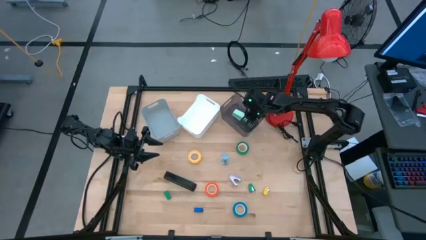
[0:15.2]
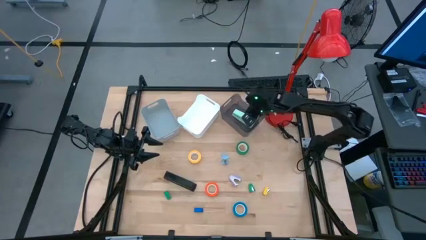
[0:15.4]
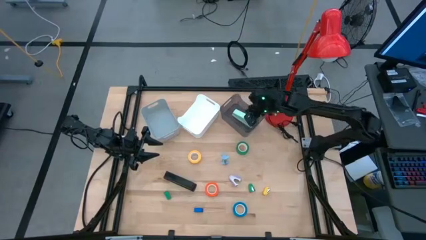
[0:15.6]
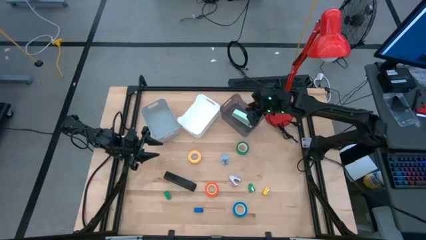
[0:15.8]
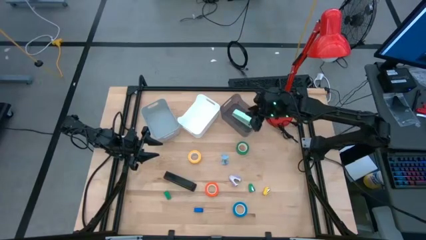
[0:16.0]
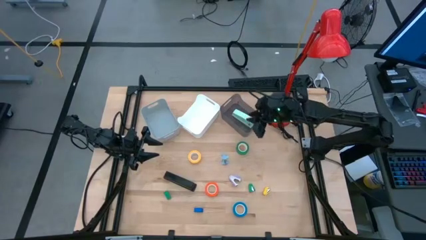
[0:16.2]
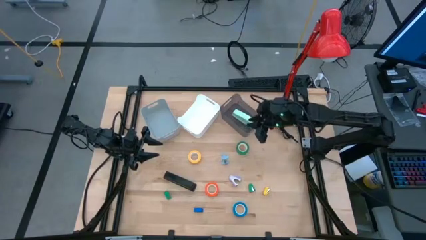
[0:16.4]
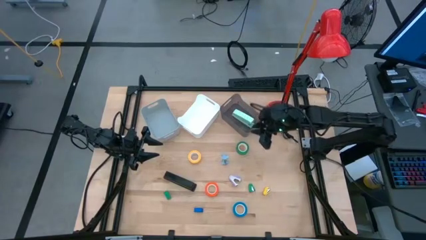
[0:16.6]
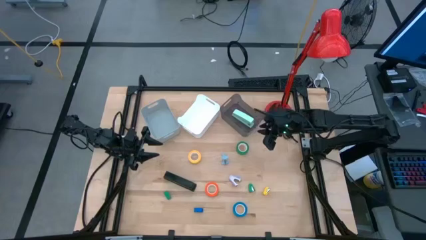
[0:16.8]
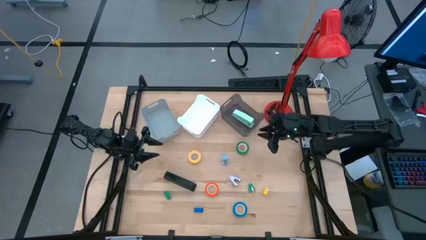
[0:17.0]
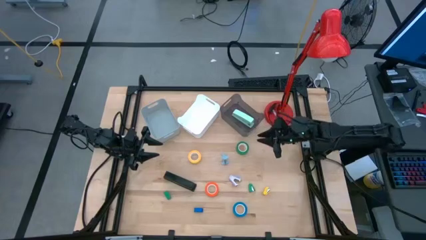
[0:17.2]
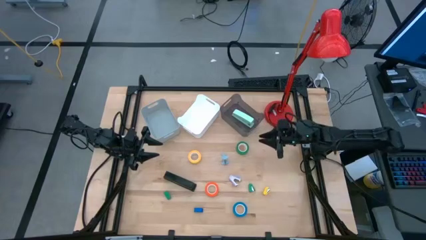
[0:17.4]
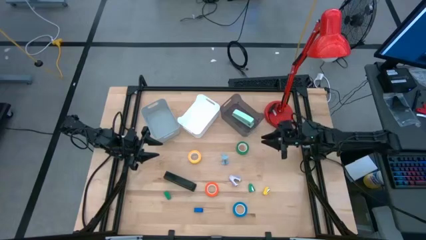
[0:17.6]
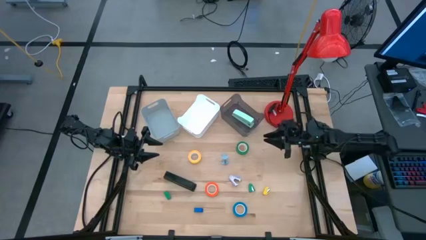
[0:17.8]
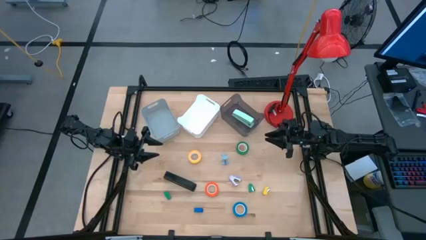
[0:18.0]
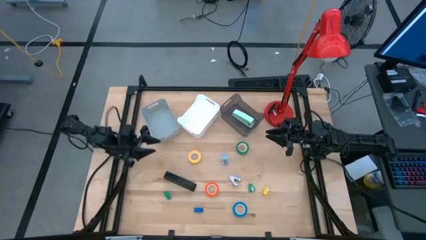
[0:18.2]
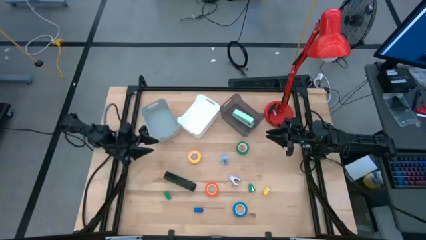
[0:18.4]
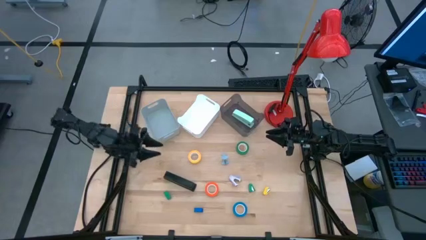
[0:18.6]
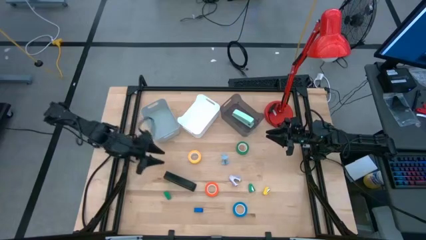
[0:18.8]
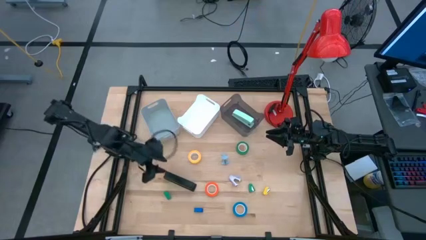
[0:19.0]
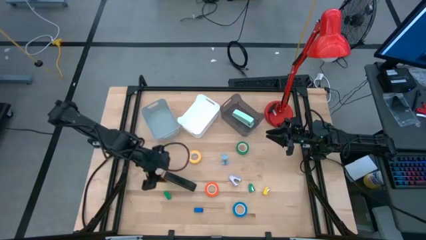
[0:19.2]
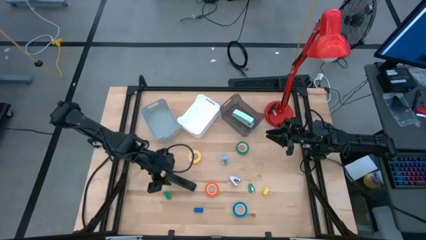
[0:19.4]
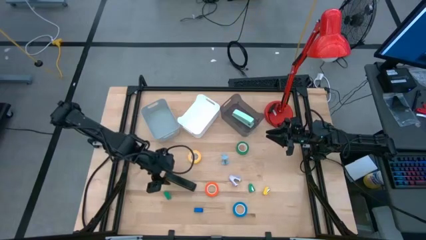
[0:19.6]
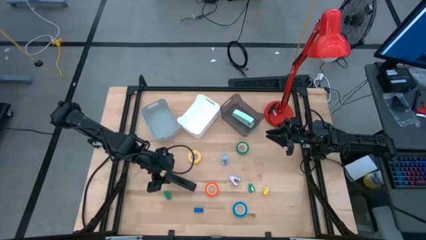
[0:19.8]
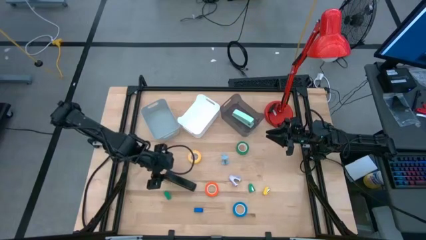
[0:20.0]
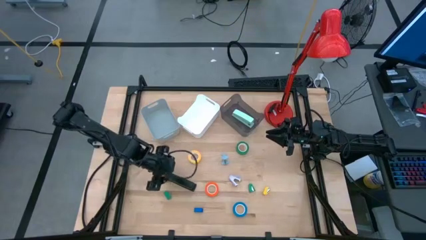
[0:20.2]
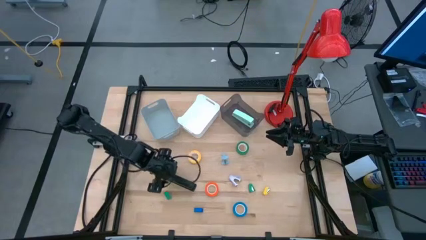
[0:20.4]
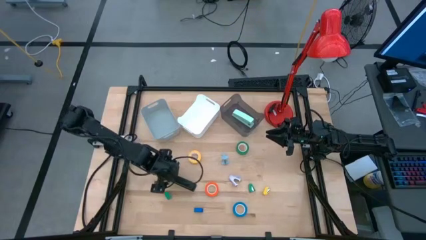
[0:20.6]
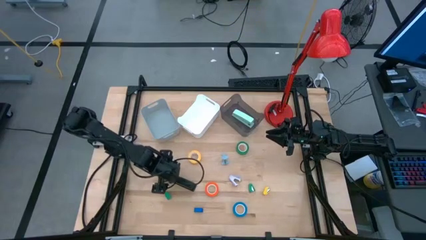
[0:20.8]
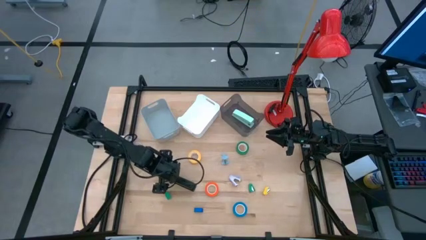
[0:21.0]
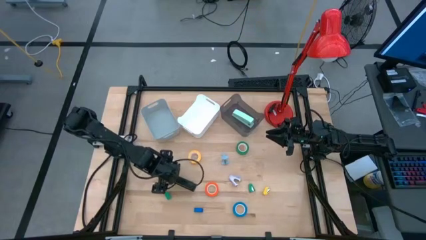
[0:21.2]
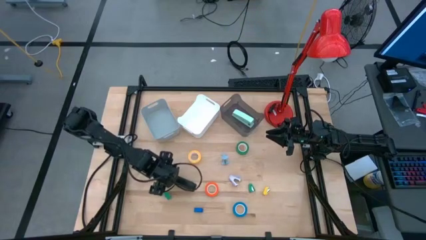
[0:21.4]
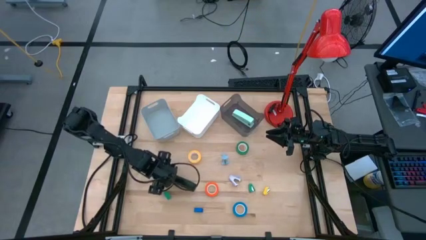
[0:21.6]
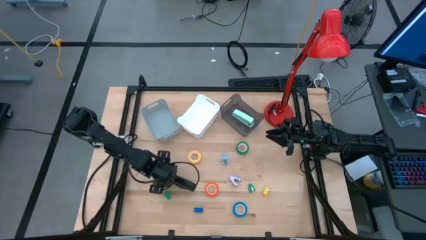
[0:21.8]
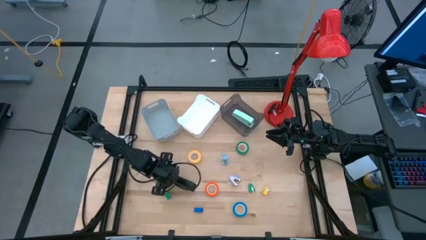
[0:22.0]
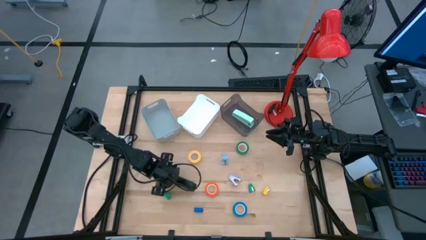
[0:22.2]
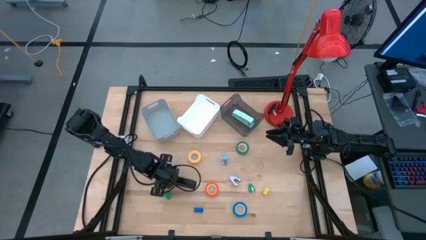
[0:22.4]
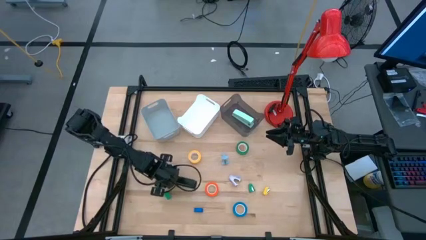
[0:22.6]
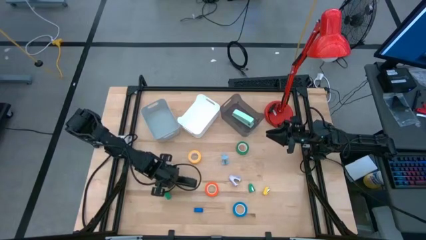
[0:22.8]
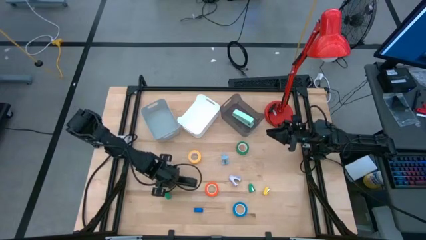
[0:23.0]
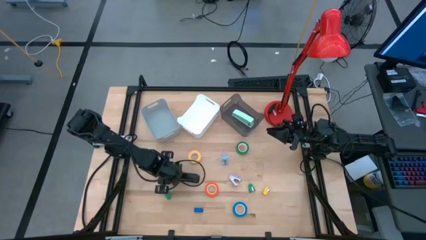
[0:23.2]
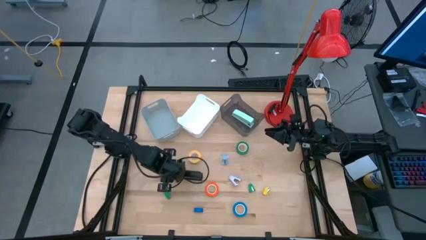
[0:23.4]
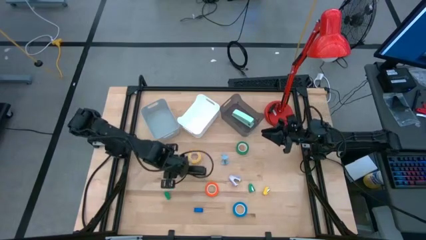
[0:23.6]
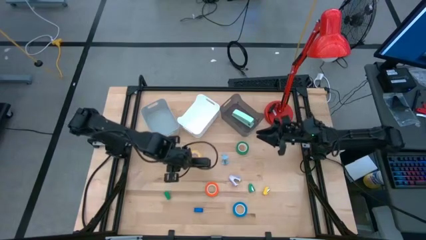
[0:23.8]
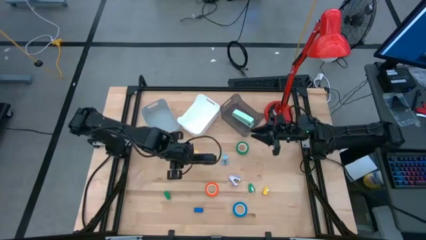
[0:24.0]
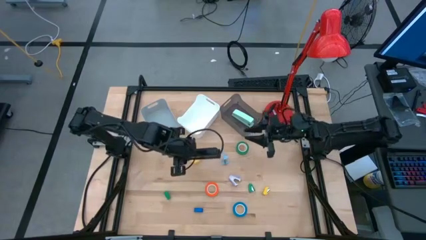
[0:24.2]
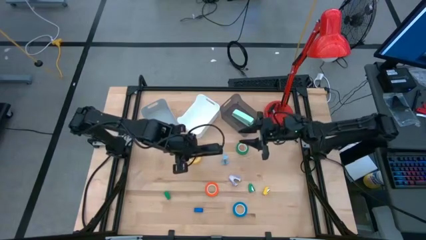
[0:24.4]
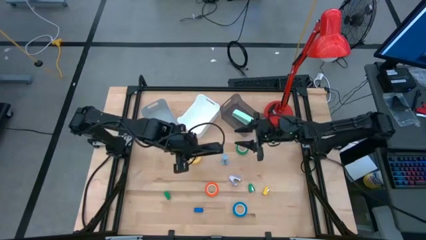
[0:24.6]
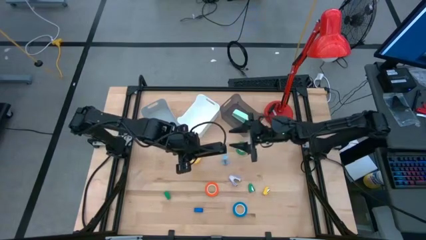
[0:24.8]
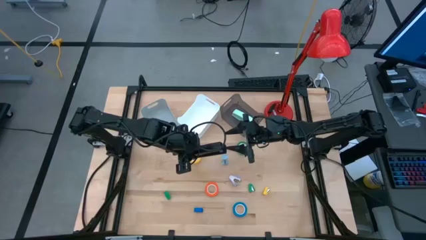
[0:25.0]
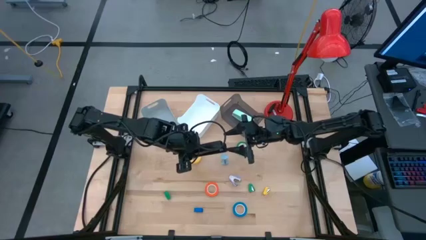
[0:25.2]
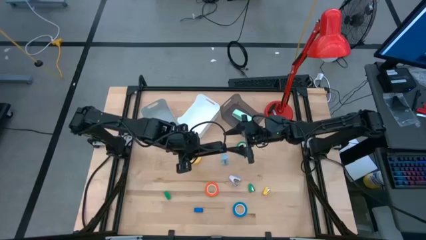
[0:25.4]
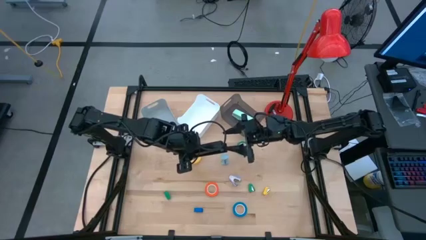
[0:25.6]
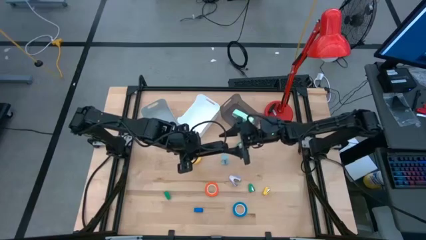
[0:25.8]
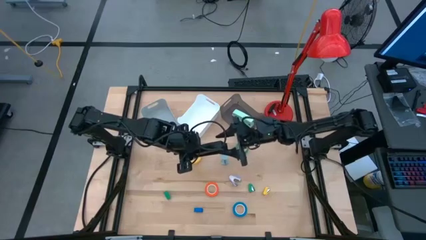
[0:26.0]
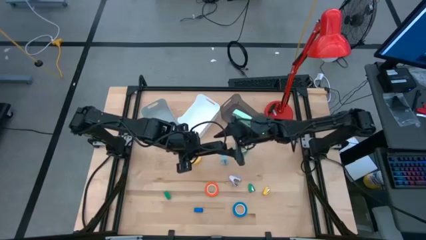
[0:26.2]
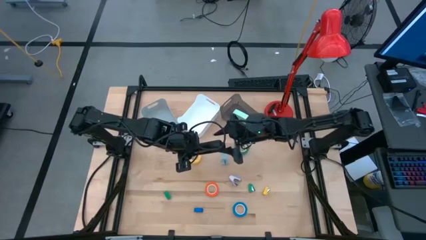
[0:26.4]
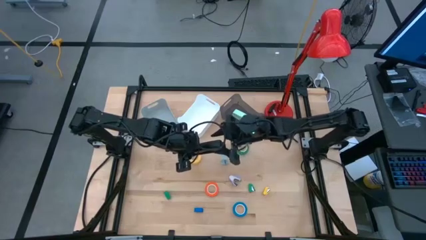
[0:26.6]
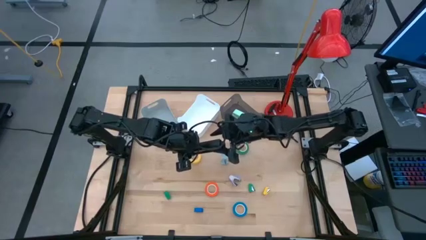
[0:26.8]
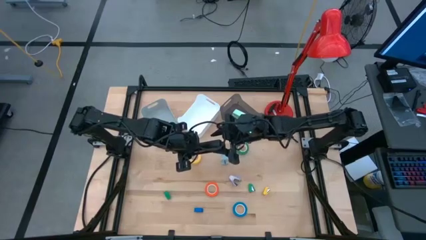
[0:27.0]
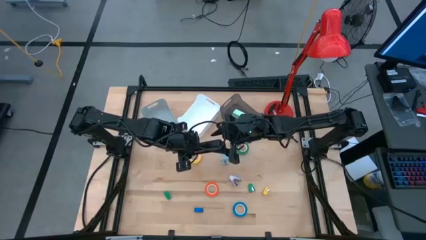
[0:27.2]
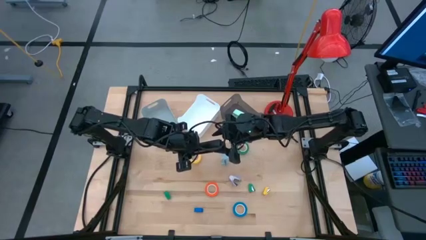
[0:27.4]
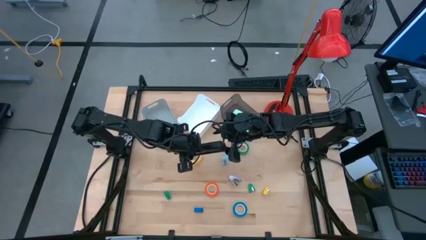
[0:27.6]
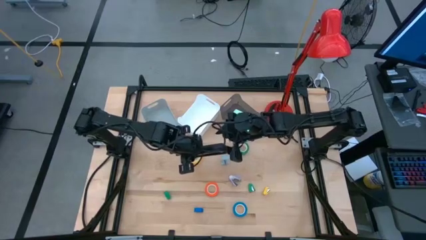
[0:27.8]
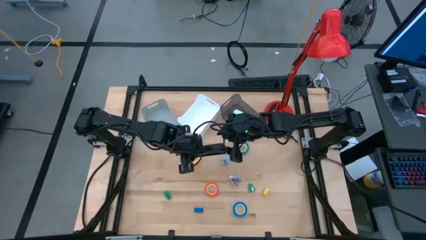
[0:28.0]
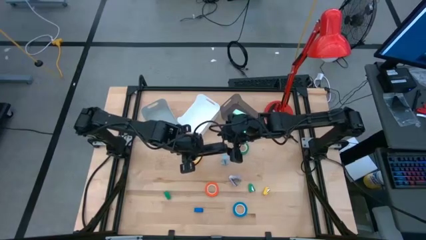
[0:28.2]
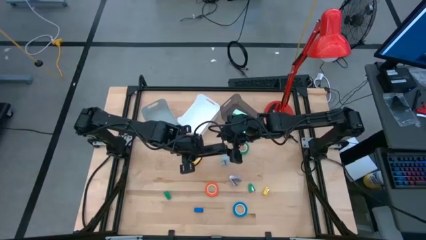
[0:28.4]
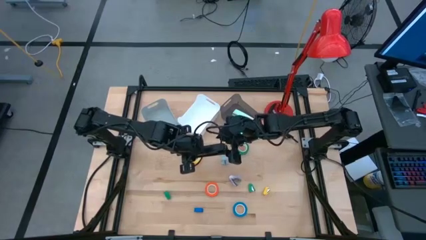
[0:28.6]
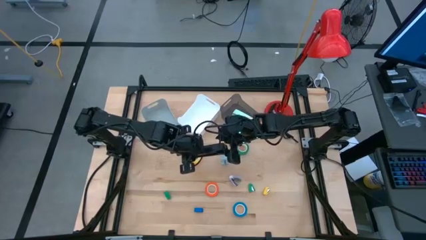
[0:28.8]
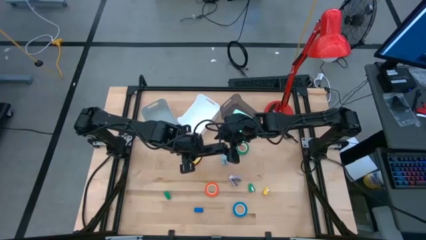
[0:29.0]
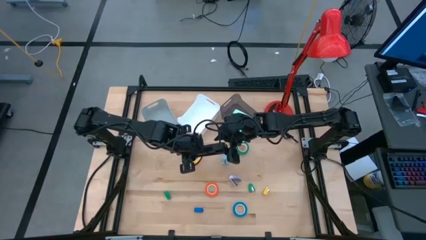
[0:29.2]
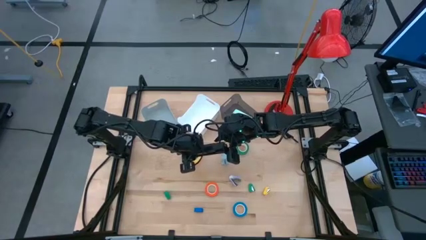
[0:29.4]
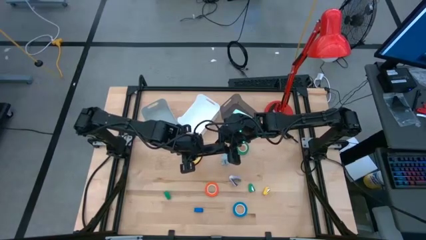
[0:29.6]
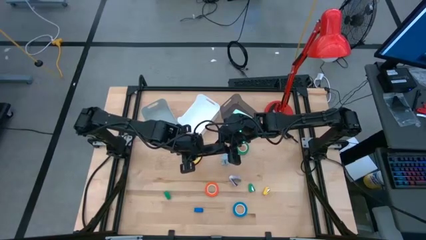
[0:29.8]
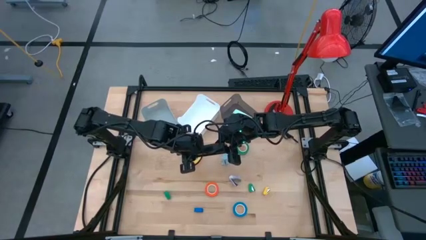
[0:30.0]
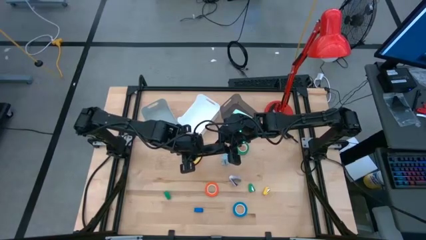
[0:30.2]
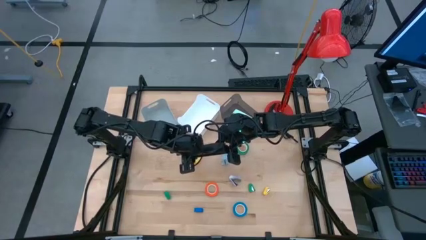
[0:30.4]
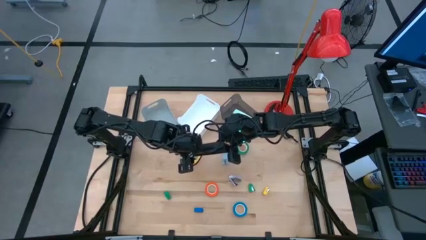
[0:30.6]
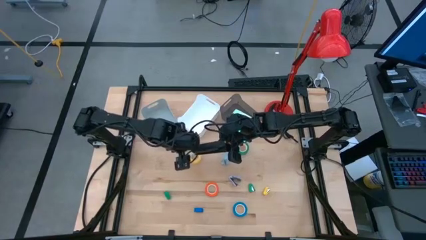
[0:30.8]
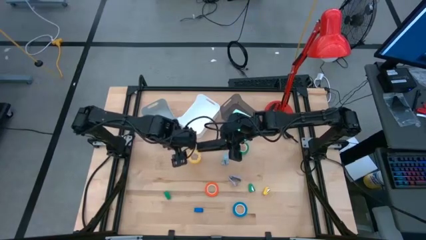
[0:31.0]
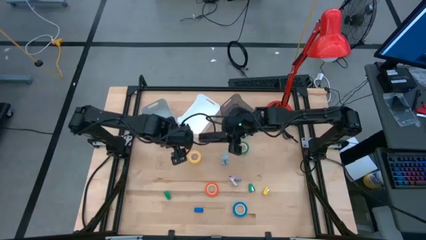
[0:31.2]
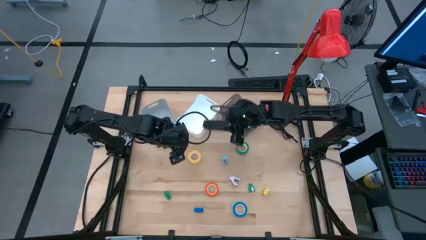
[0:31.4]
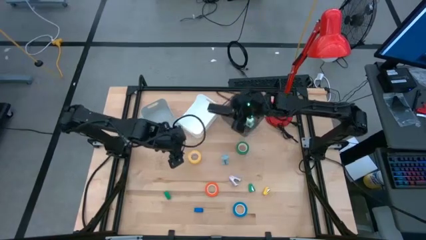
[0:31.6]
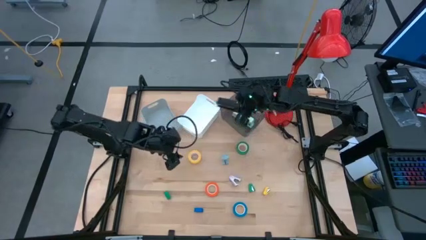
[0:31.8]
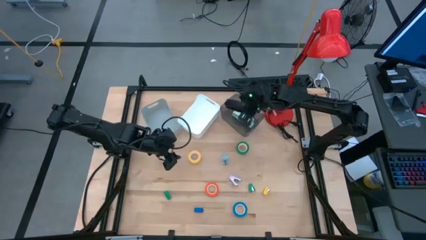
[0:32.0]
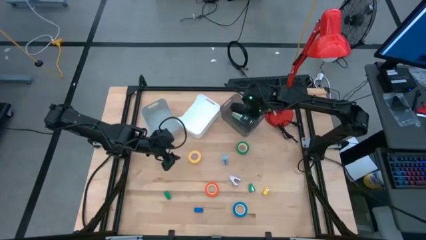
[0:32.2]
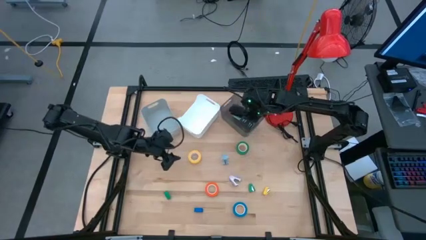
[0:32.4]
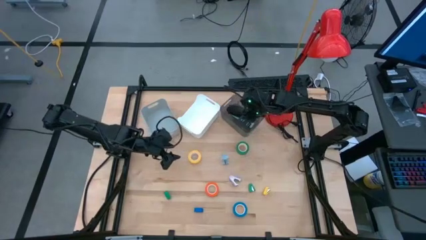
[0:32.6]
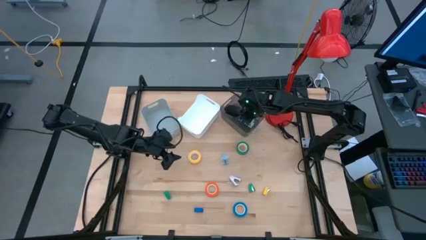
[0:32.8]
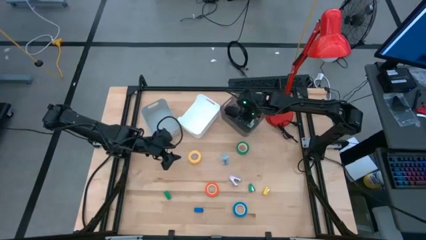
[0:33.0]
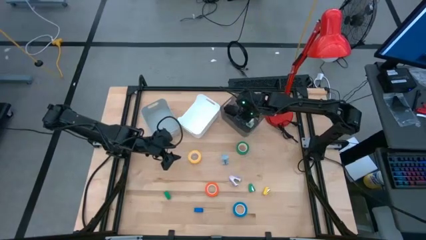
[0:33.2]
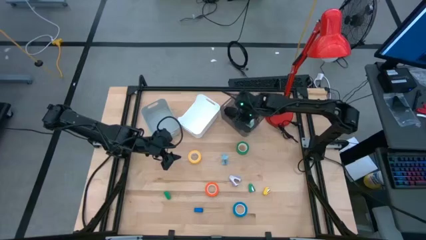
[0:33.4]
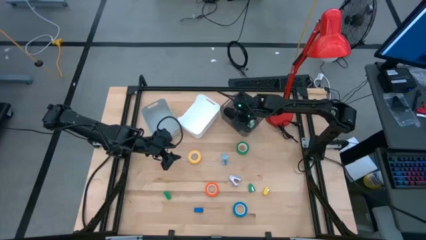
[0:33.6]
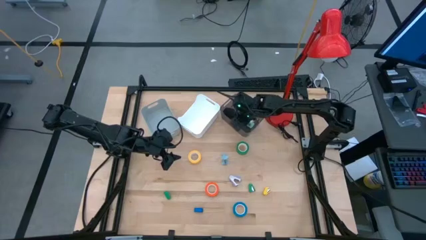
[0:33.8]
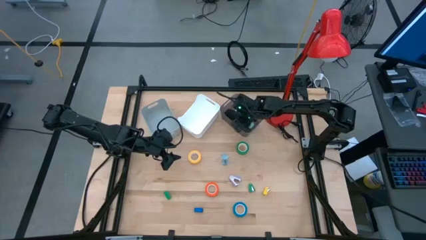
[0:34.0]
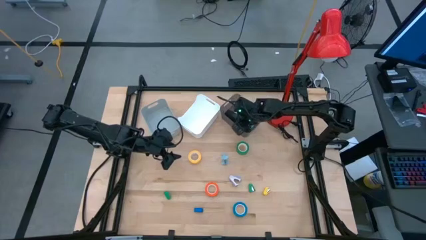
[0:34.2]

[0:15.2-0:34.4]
Task: Pick and place Stapler, Stapler remover, tape
Put the big black stapler into the black bin
